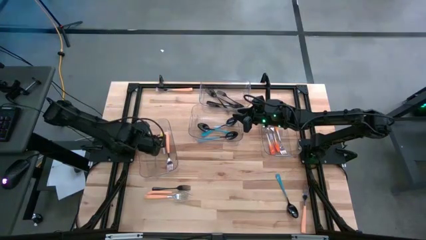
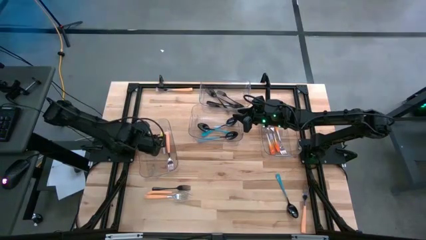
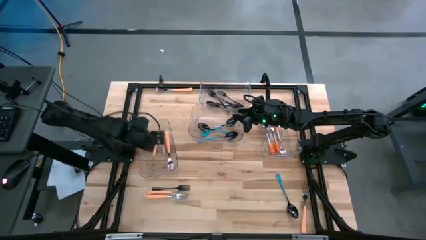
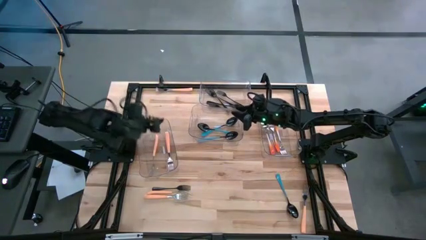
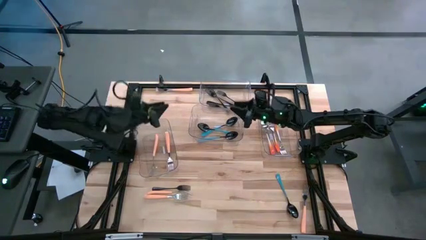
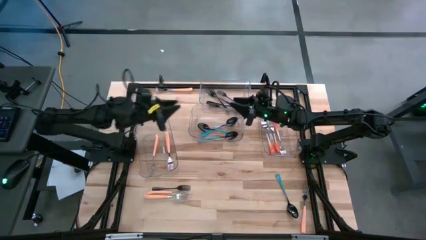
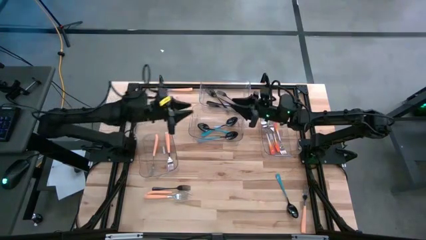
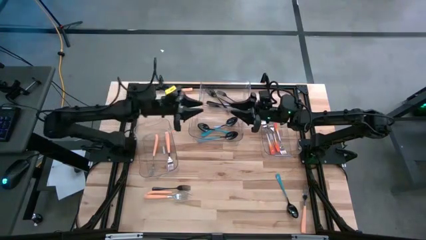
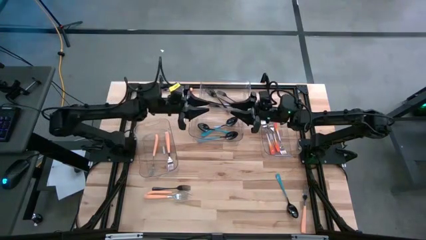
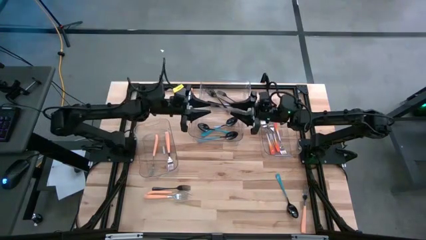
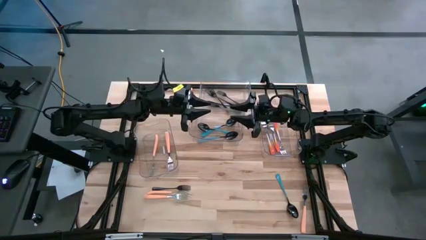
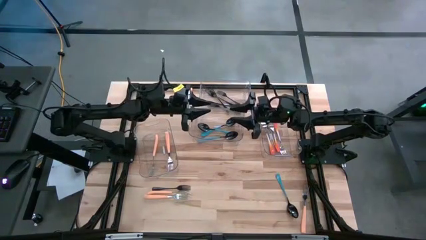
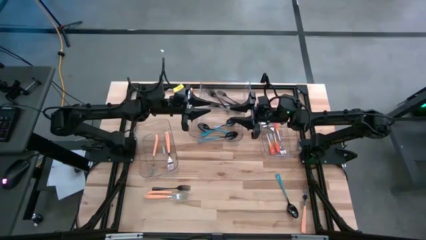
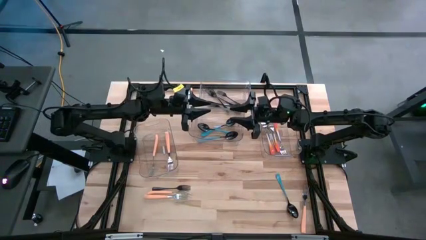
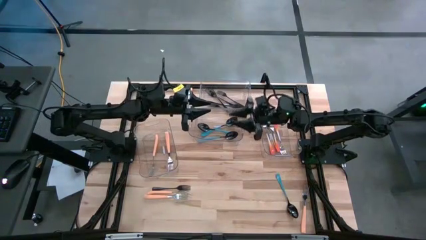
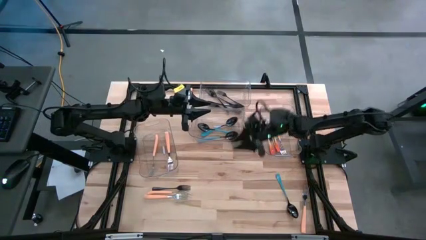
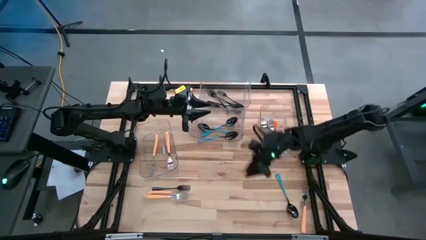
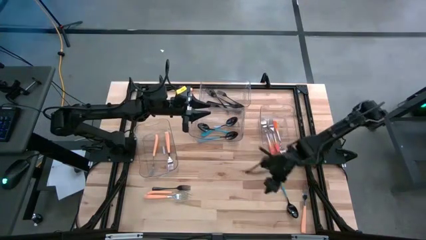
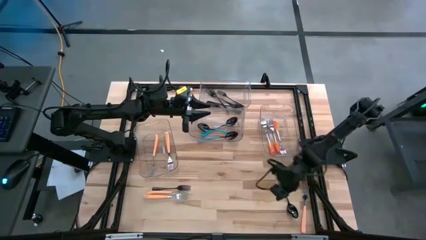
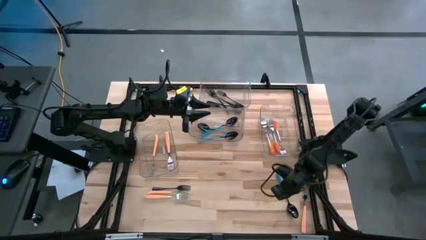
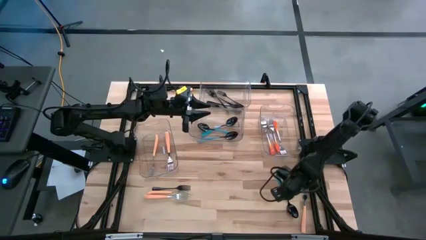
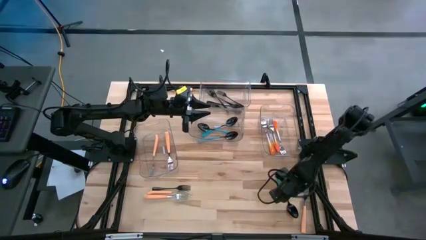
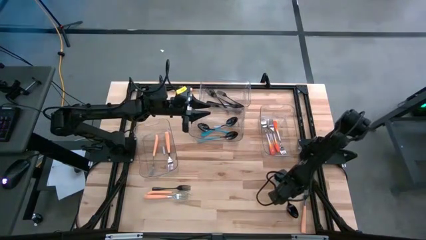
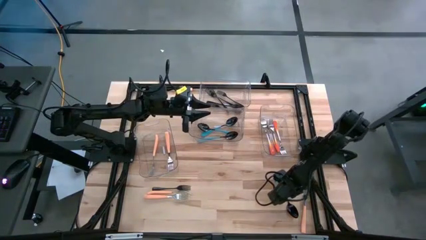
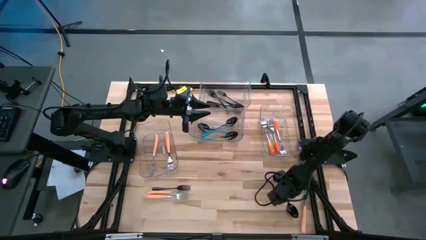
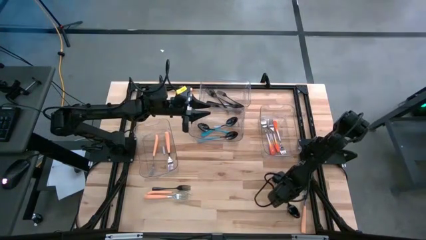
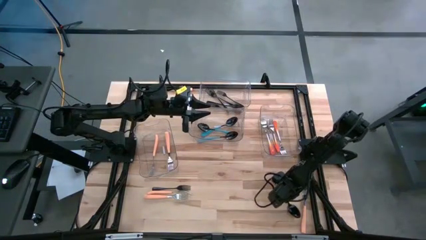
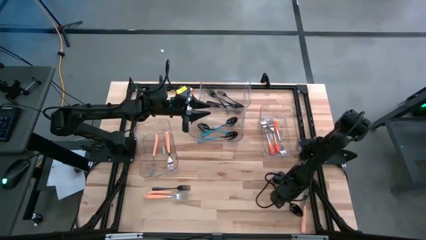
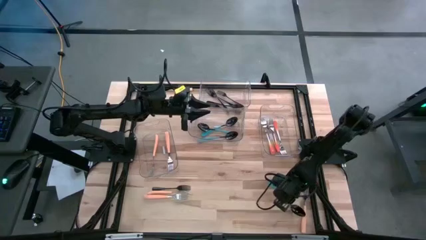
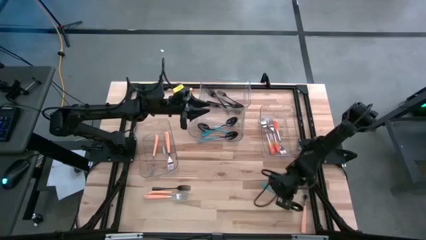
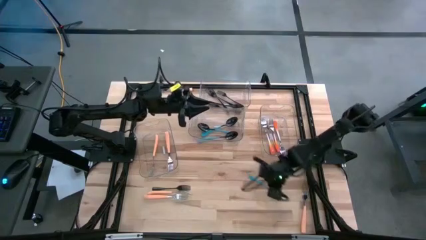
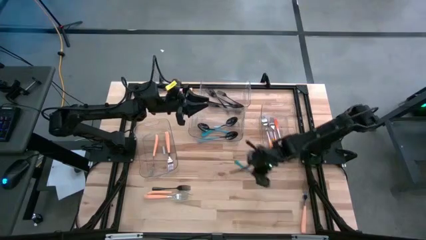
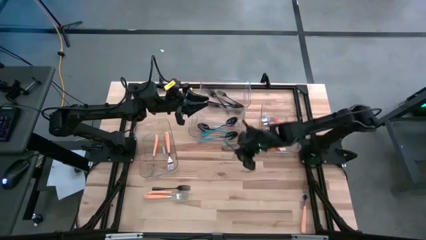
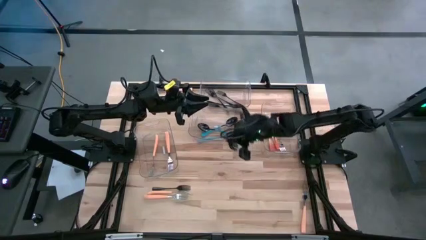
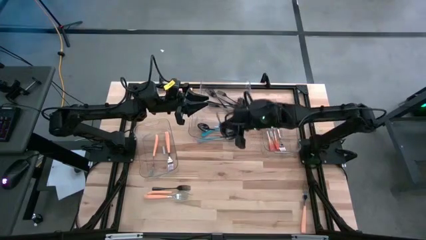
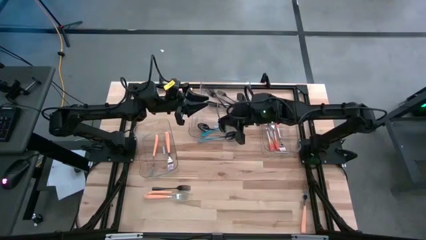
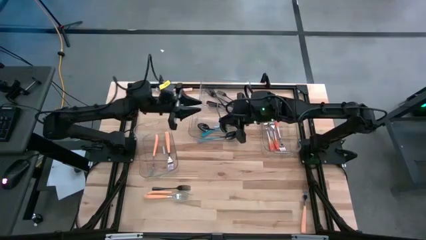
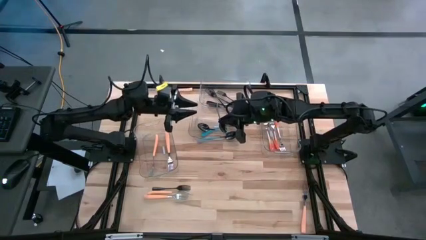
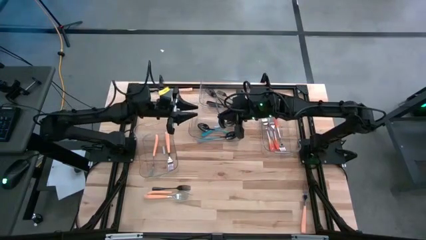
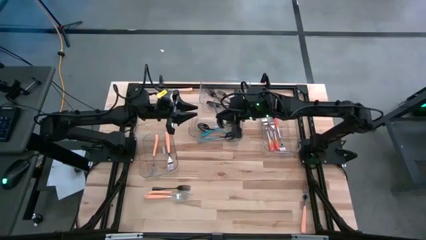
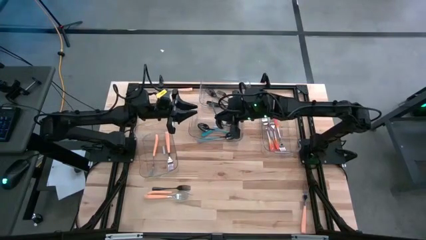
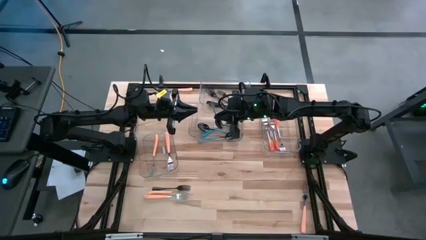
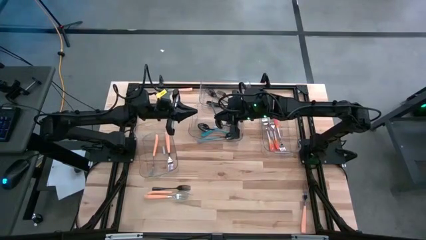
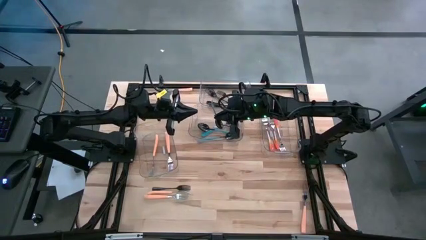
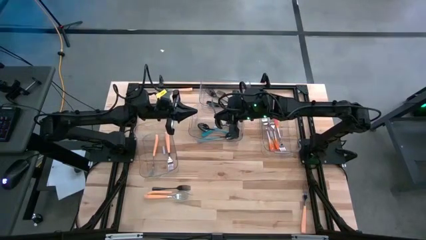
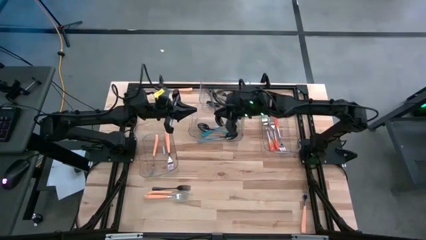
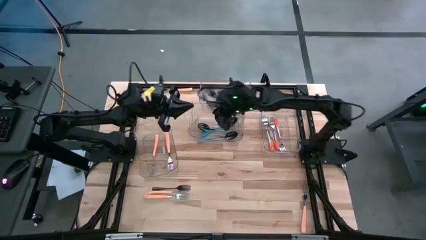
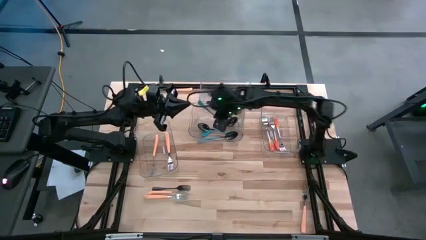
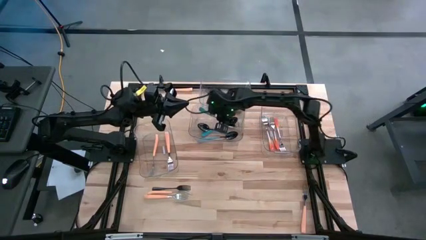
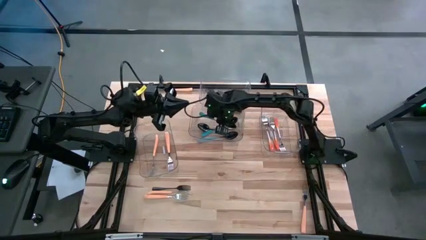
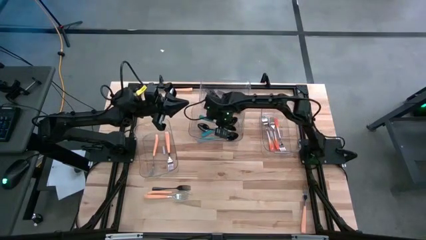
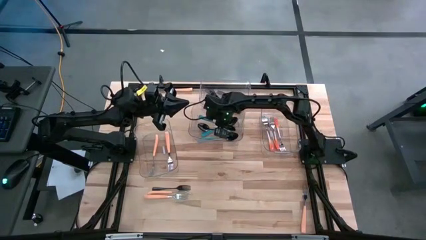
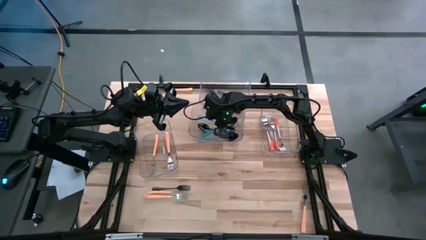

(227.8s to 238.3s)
Task: Sort silverware by color (type)
Put the blue spoon into the middle transparent bin
